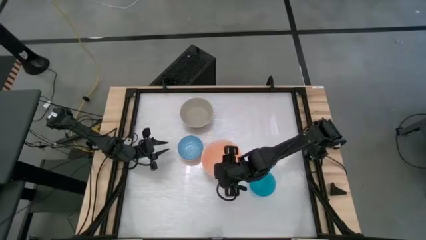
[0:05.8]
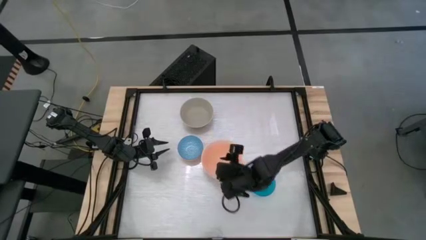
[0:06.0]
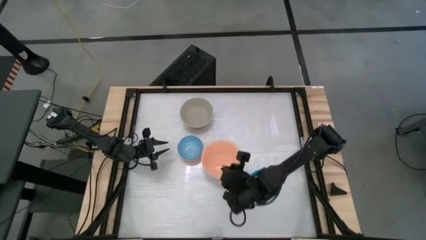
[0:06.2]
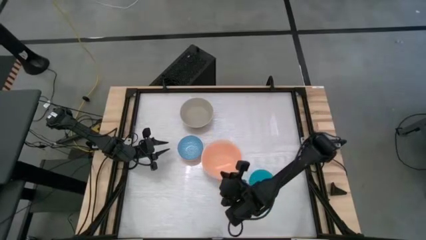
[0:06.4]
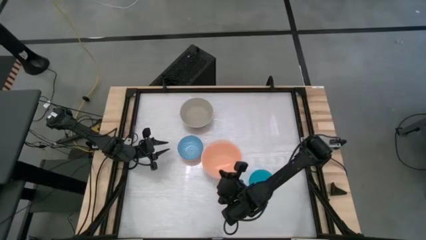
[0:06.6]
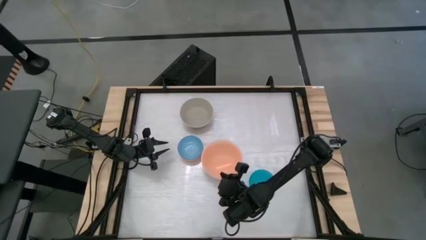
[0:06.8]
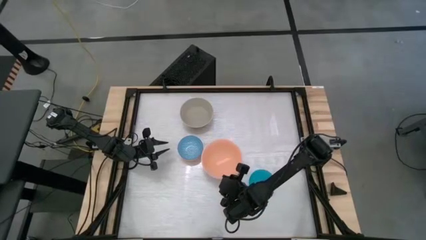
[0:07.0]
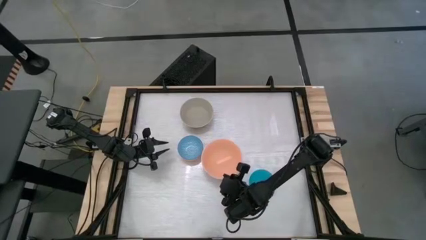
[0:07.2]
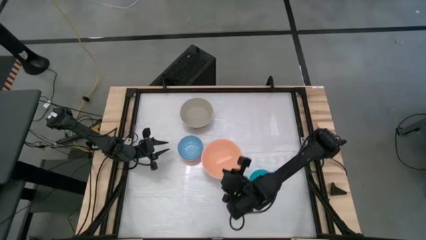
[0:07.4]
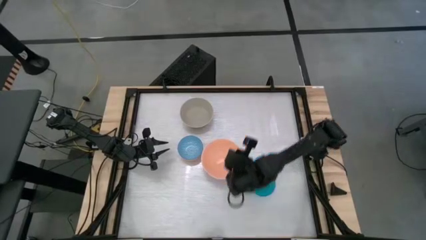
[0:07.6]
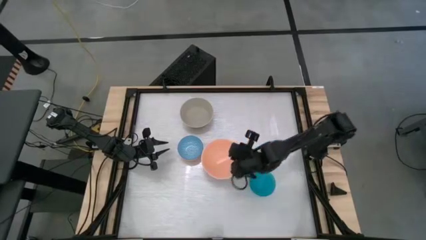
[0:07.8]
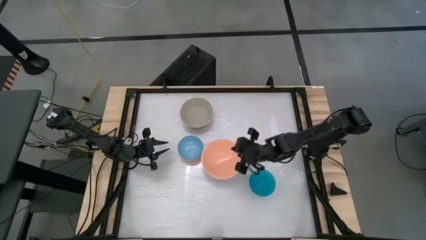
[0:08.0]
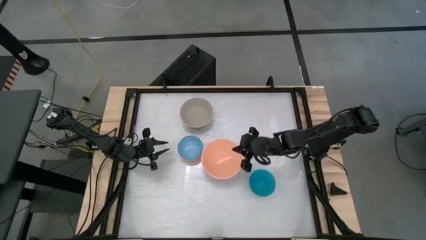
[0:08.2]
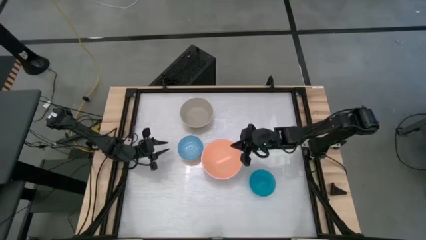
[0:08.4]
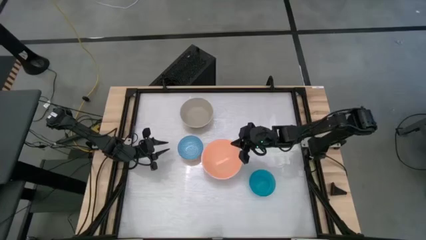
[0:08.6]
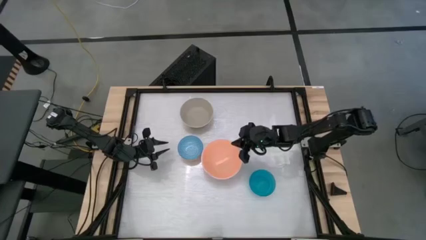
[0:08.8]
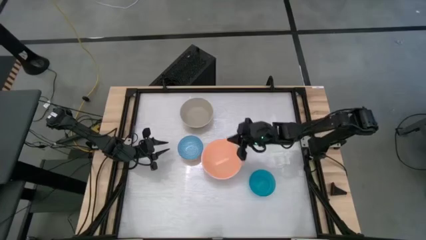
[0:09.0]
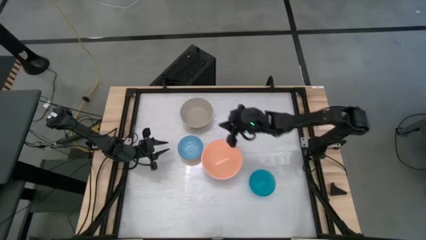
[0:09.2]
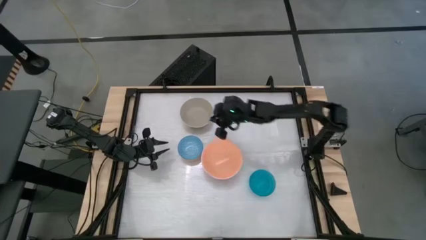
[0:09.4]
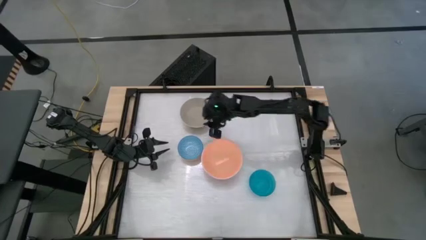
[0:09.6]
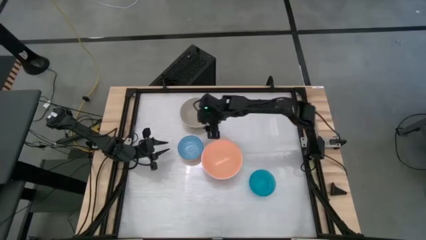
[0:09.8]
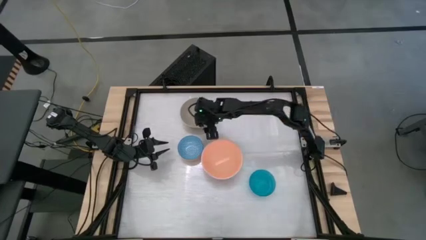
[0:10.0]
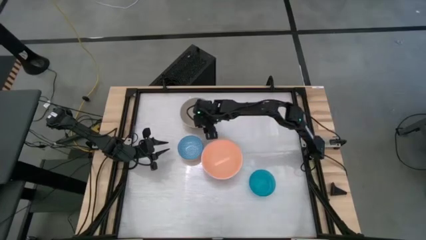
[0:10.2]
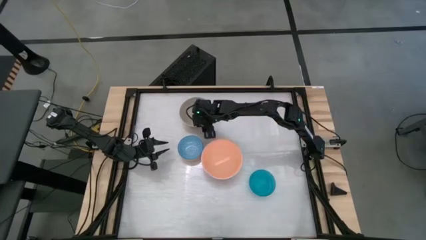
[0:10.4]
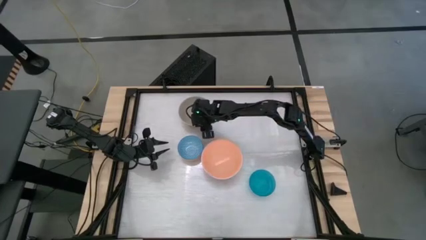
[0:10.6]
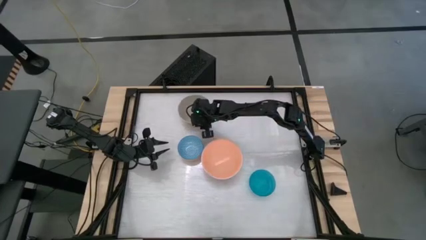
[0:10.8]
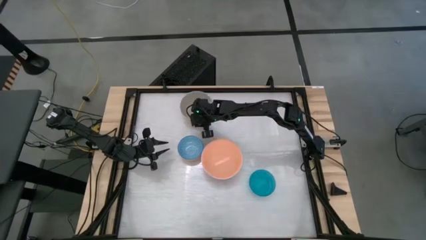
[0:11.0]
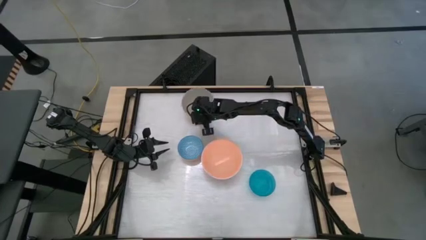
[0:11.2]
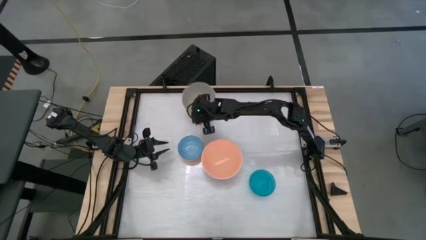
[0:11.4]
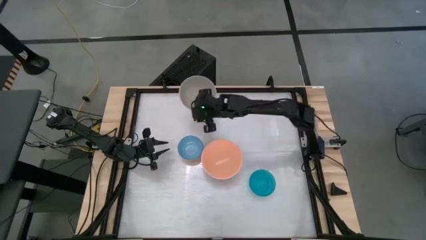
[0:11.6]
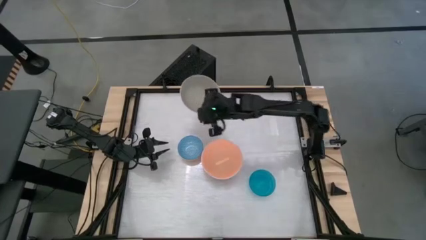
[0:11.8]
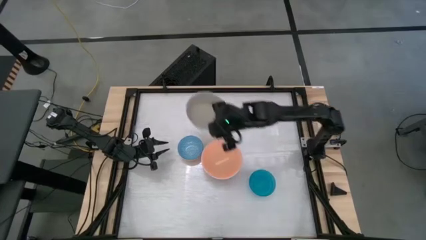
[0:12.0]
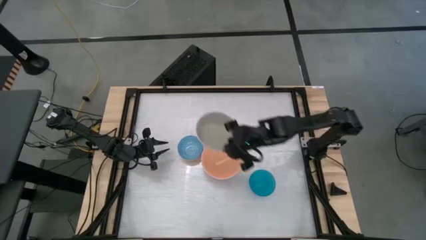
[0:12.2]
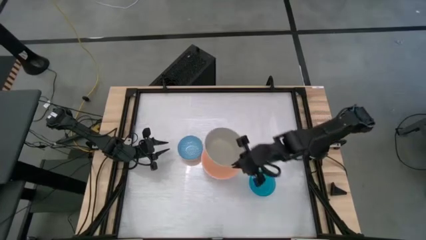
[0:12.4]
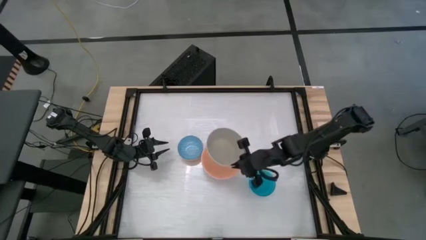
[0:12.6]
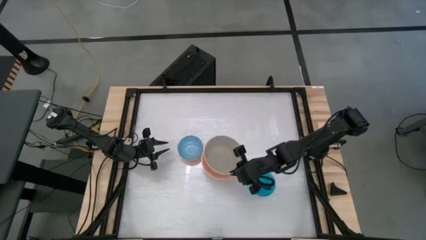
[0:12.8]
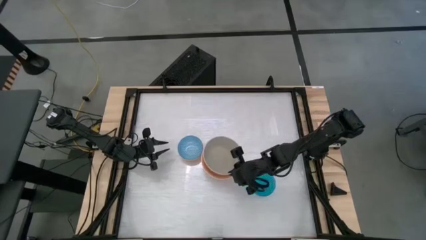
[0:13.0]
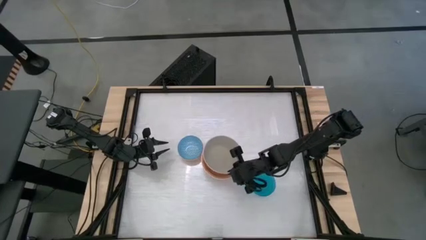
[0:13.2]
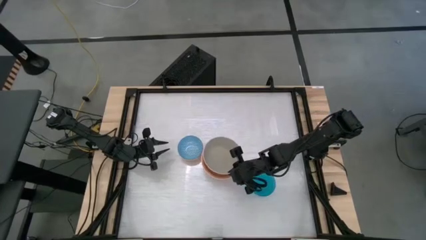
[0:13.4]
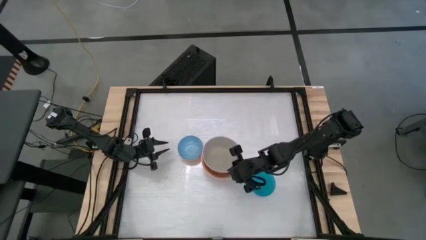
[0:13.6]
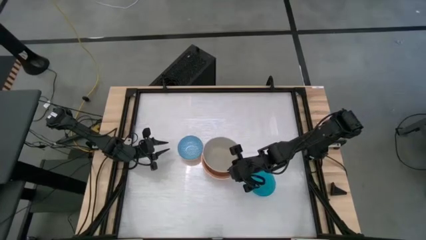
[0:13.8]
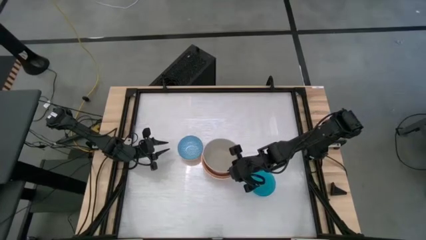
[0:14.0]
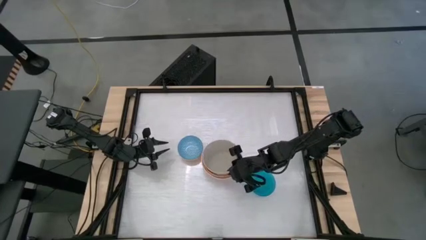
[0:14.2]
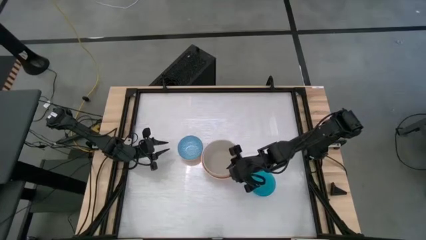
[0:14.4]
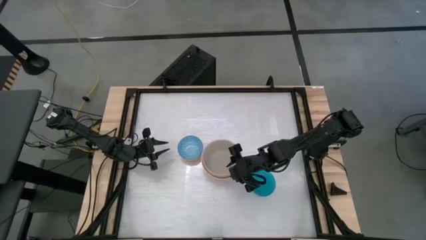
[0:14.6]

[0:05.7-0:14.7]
Stack the gray bowl on the orange bowl

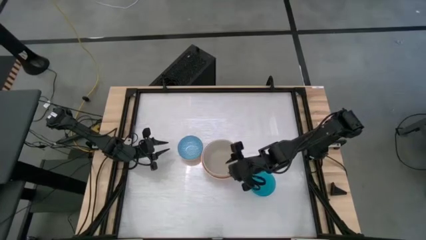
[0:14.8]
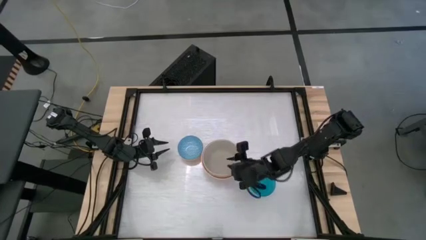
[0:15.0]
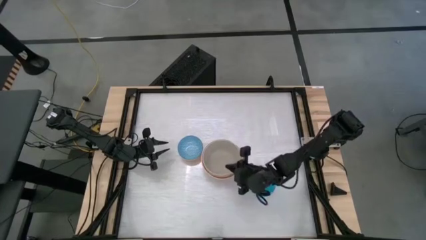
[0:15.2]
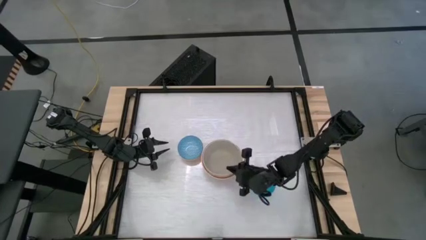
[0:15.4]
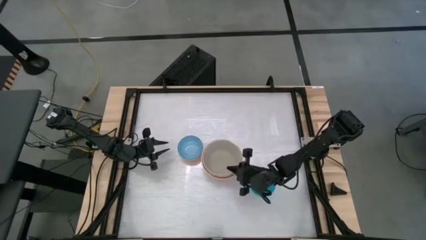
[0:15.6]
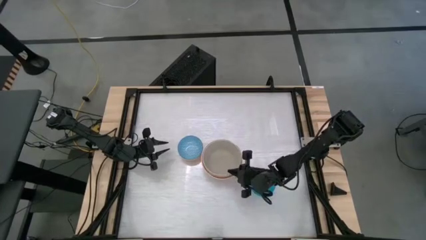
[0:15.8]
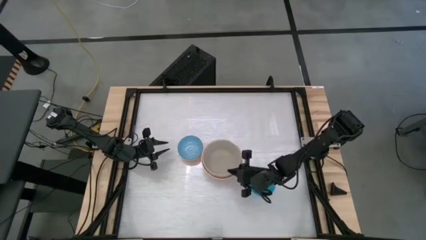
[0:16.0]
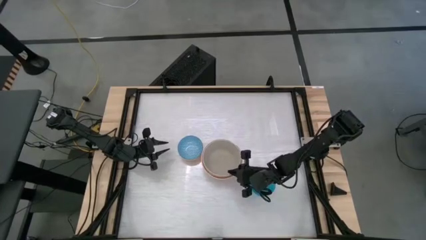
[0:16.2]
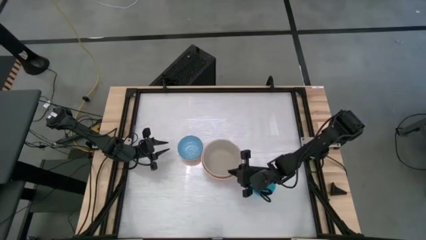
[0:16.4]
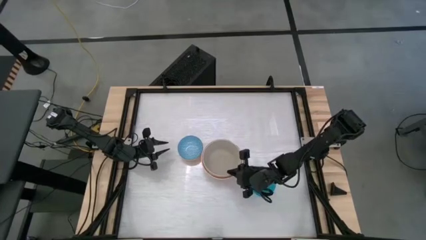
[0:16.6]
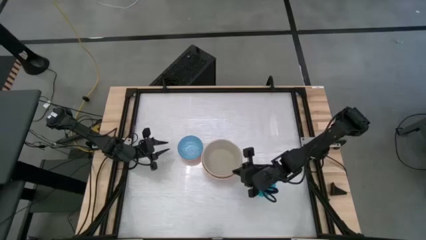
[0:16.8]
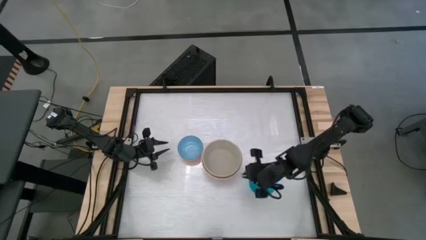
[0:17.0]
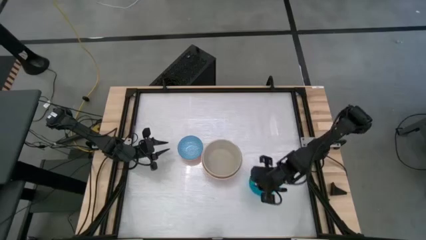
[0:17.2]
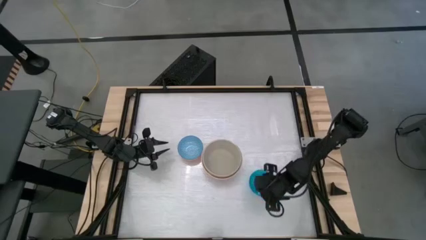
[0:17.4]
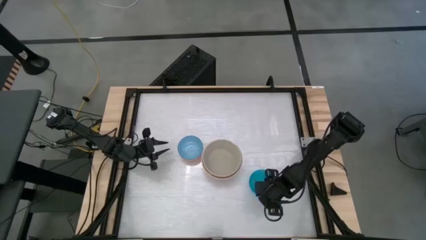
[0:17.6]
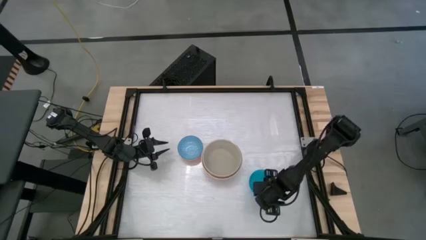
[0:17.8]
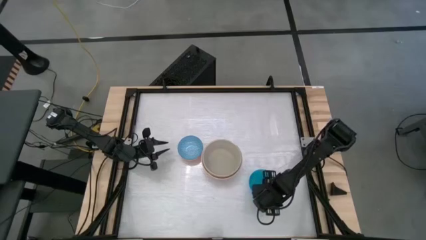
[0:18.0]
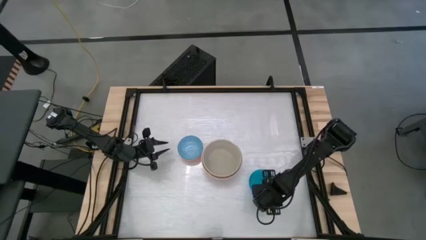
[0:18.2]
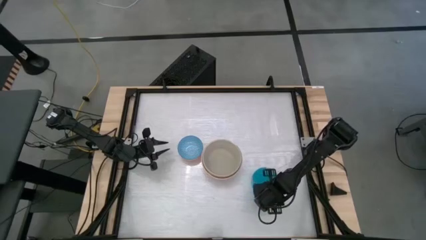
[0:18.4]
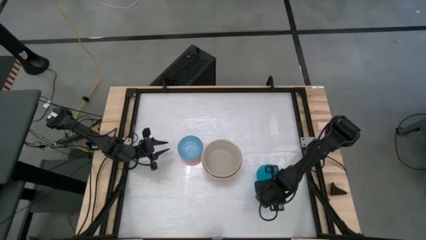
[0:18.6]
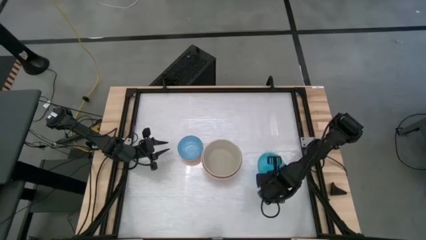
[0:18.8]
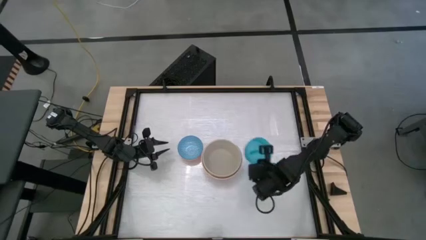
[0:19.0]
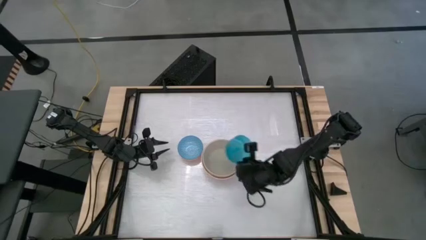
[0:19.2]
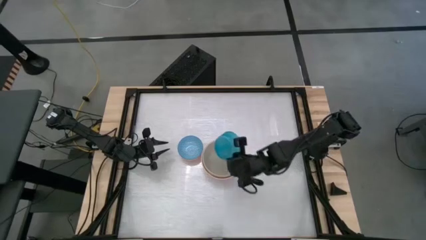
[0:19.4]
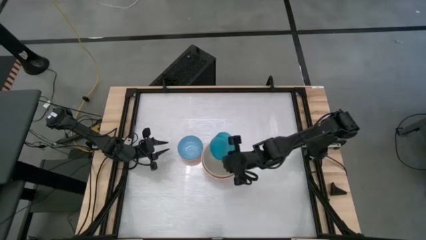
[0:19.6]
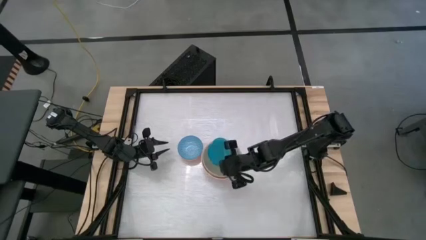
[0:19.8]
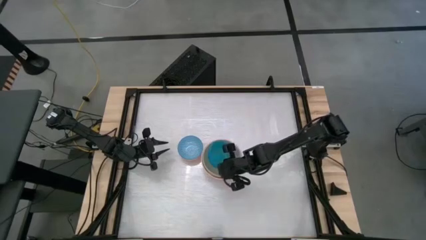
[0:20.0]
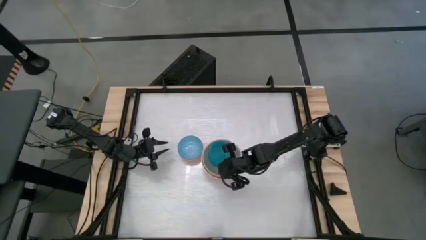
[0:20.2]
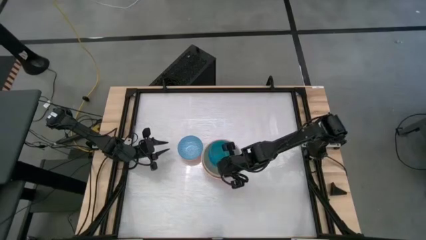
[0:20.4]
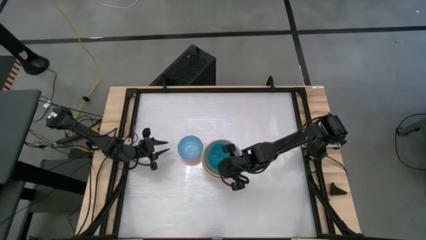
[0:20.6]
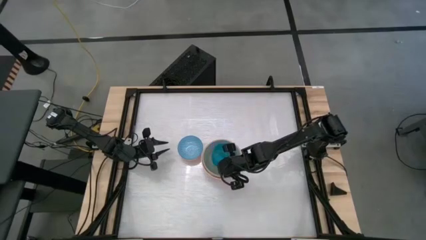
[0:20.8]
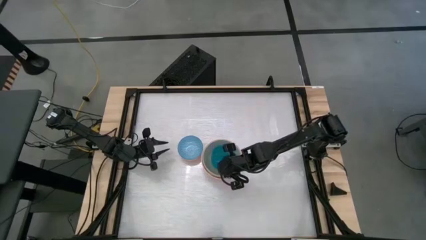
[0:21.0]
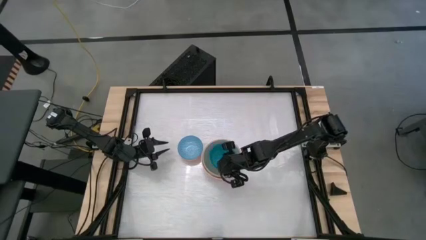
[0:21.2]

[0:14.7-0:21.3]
Stack the light blue bowl on the gray bowl
